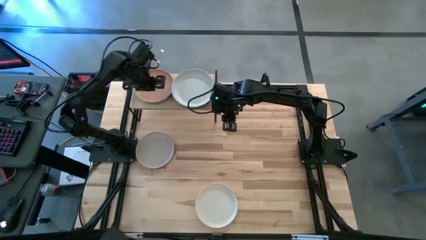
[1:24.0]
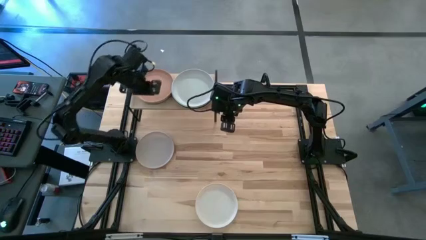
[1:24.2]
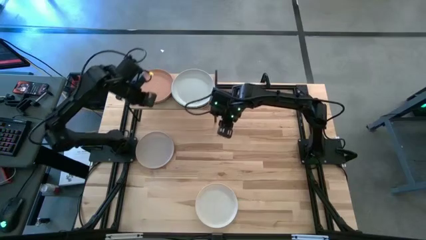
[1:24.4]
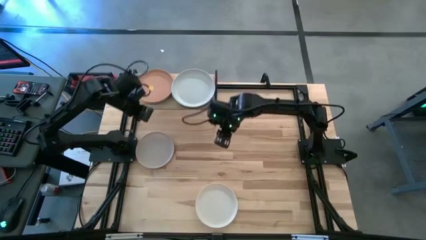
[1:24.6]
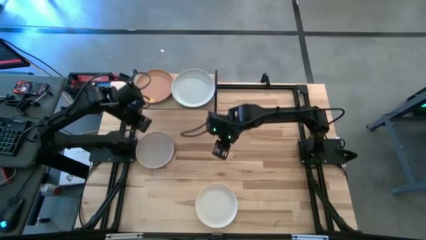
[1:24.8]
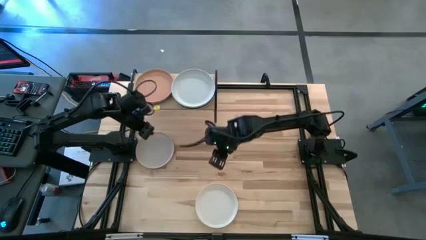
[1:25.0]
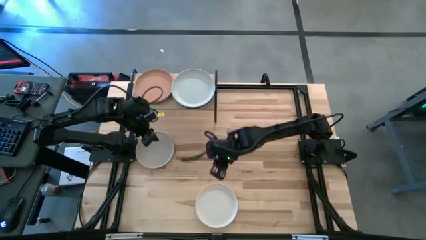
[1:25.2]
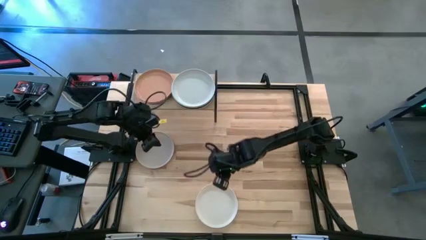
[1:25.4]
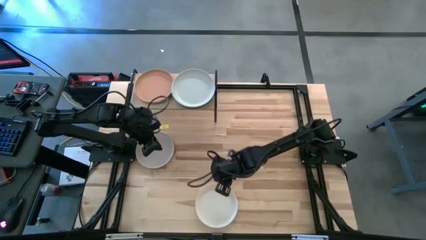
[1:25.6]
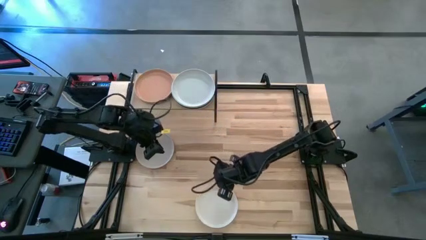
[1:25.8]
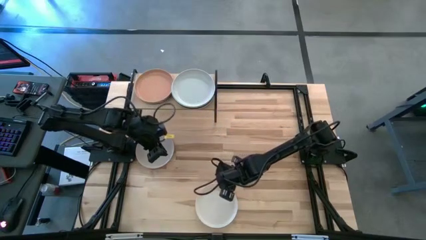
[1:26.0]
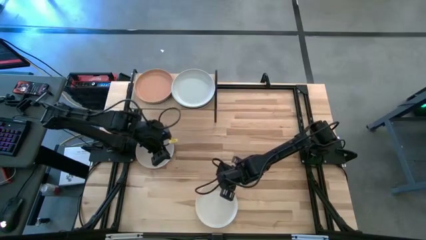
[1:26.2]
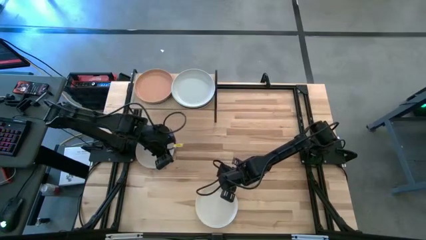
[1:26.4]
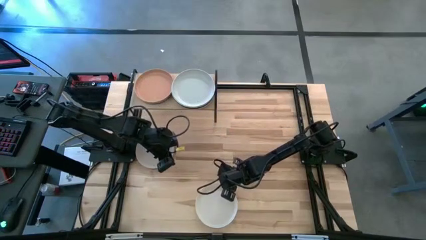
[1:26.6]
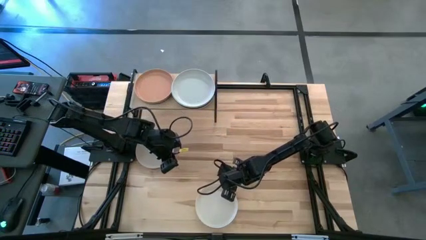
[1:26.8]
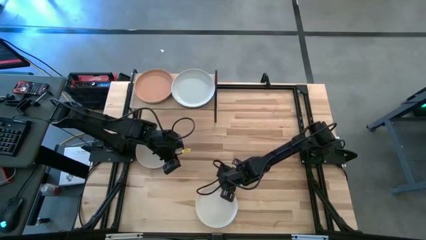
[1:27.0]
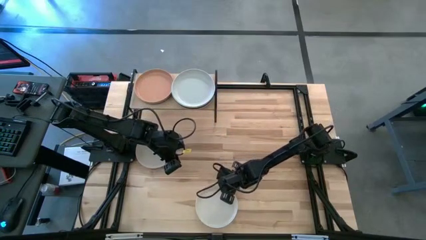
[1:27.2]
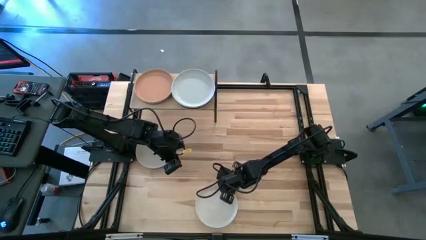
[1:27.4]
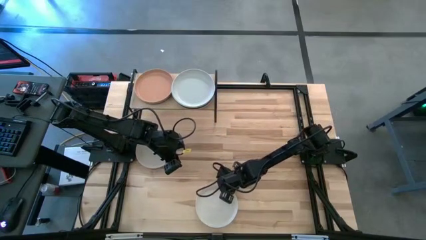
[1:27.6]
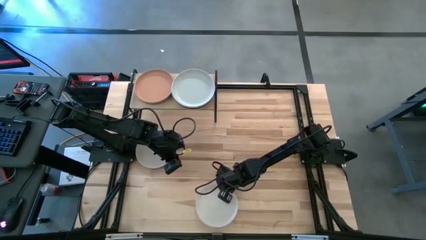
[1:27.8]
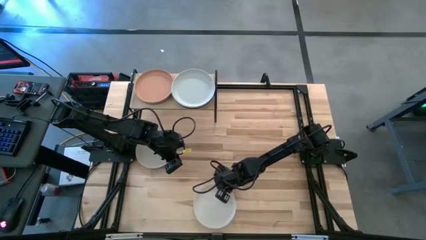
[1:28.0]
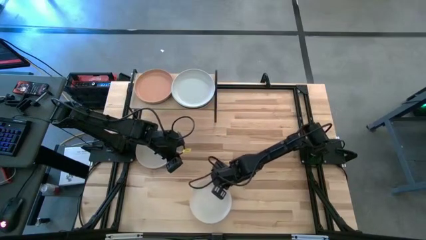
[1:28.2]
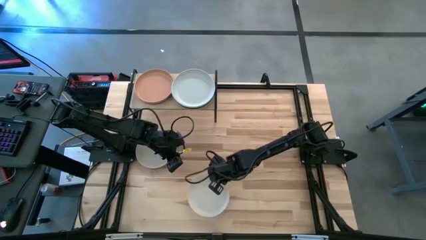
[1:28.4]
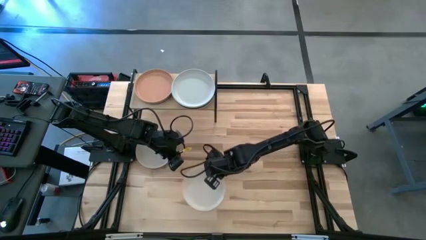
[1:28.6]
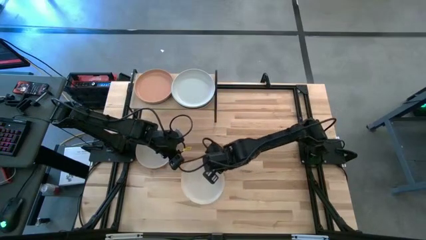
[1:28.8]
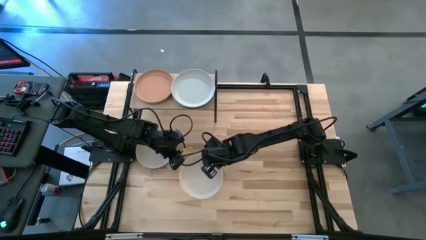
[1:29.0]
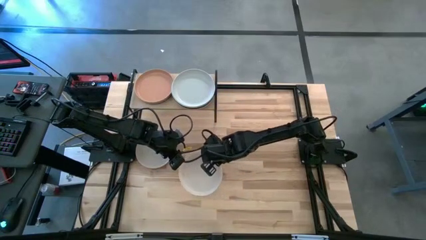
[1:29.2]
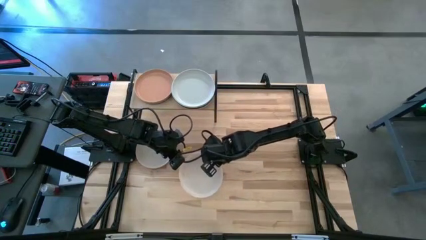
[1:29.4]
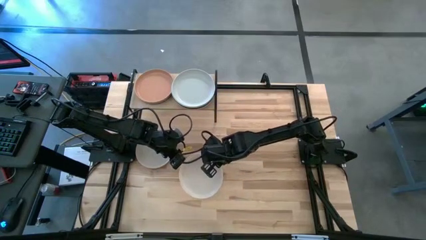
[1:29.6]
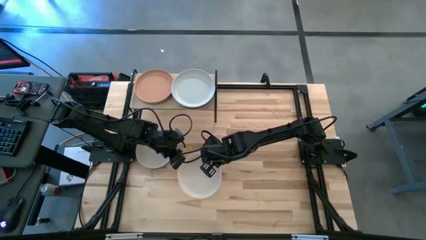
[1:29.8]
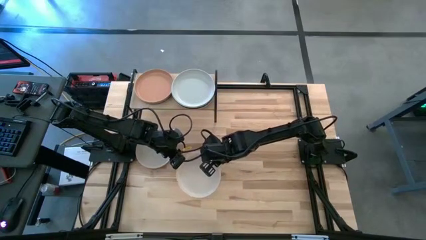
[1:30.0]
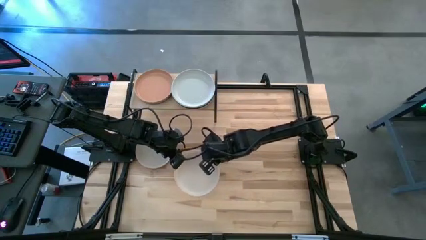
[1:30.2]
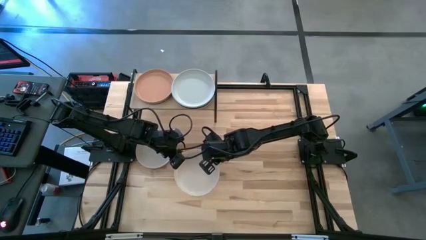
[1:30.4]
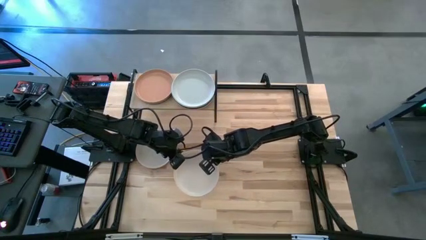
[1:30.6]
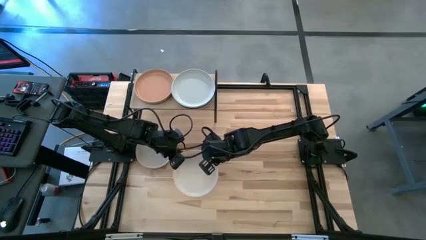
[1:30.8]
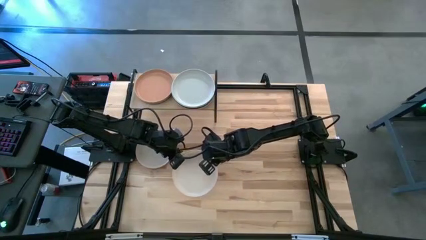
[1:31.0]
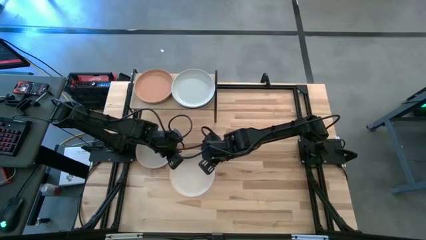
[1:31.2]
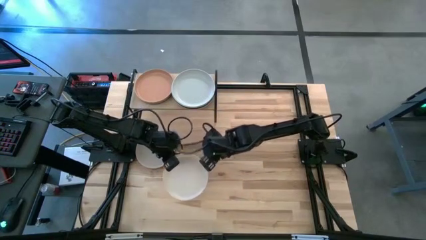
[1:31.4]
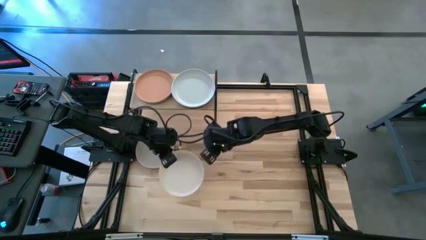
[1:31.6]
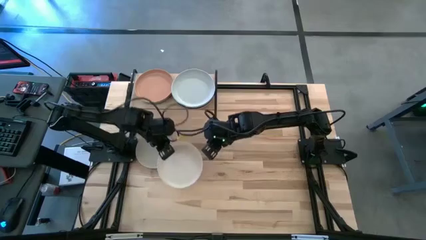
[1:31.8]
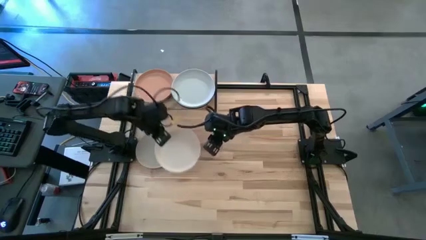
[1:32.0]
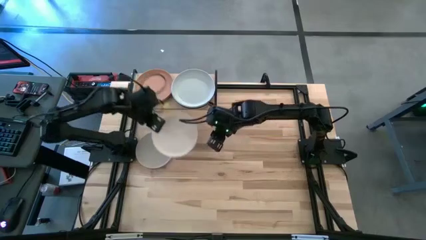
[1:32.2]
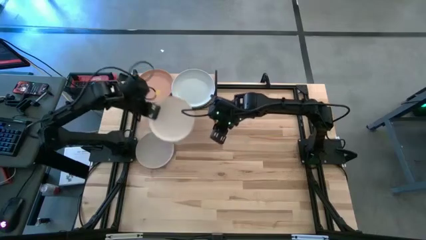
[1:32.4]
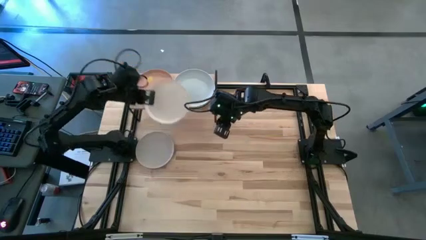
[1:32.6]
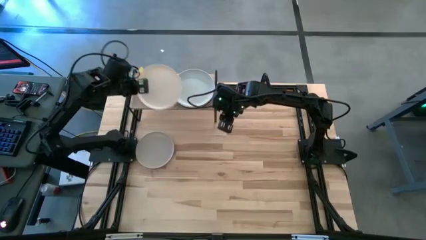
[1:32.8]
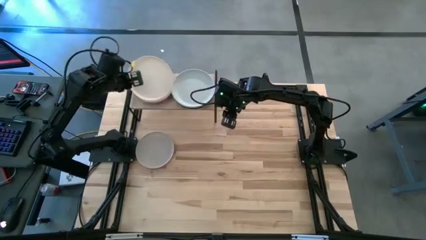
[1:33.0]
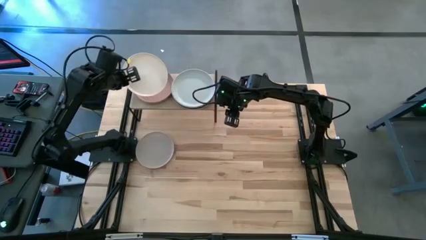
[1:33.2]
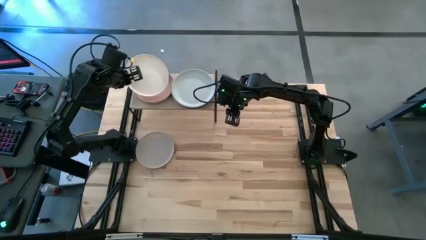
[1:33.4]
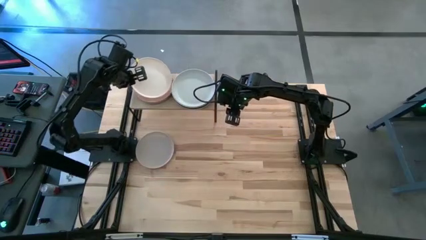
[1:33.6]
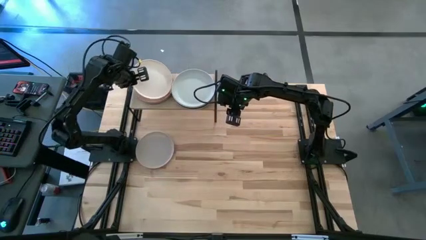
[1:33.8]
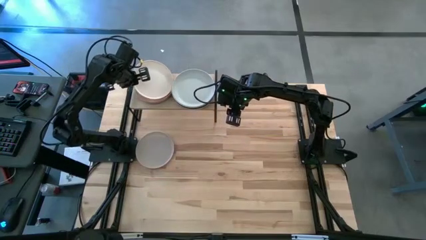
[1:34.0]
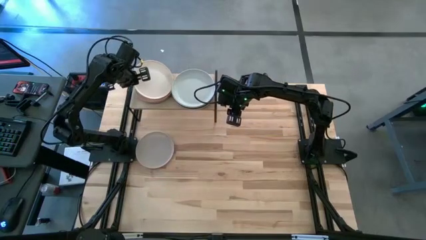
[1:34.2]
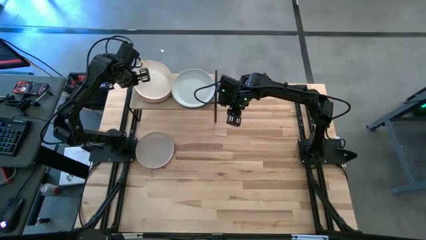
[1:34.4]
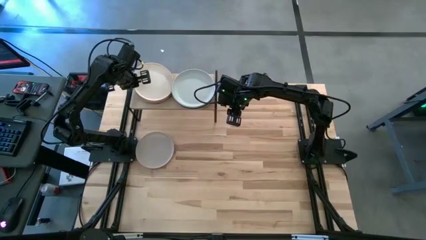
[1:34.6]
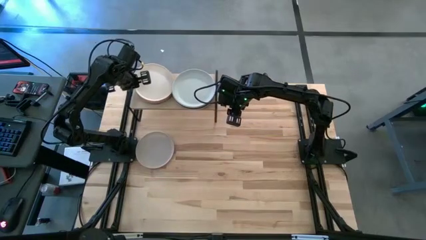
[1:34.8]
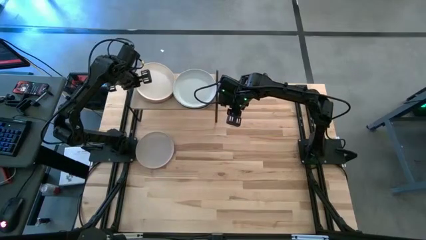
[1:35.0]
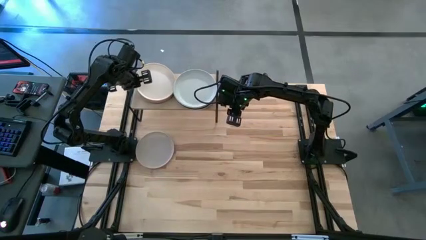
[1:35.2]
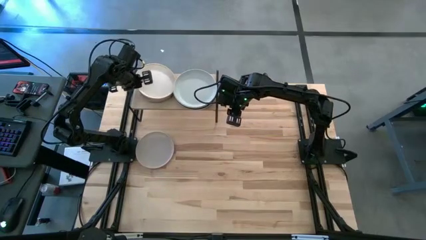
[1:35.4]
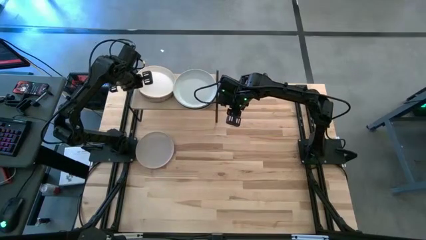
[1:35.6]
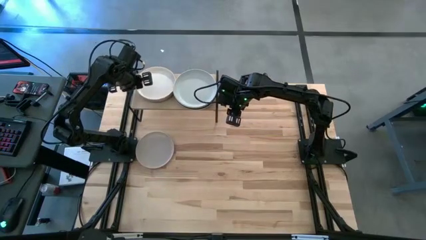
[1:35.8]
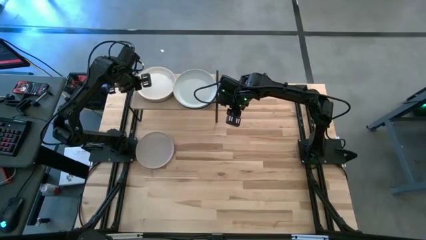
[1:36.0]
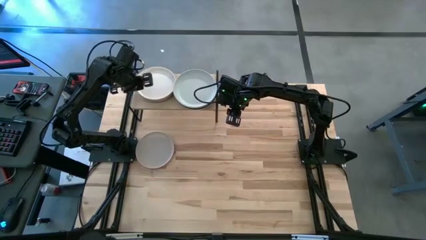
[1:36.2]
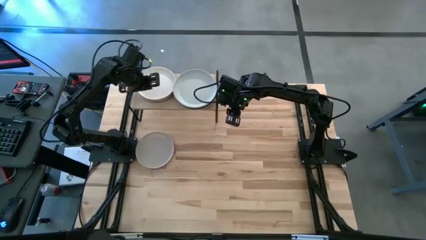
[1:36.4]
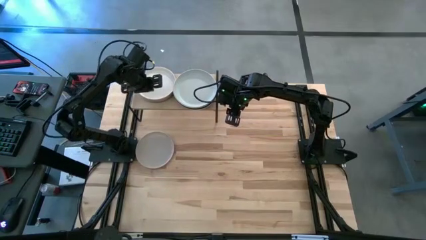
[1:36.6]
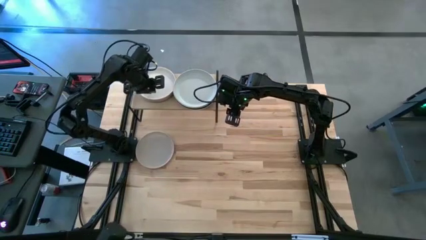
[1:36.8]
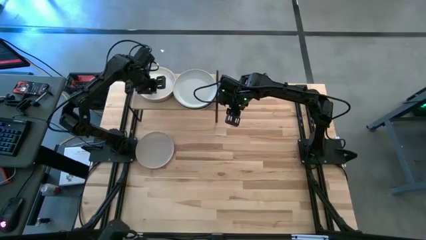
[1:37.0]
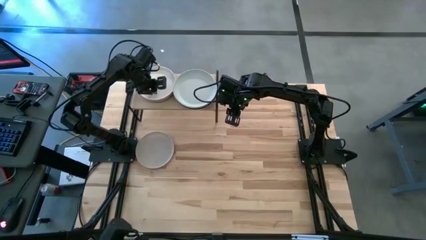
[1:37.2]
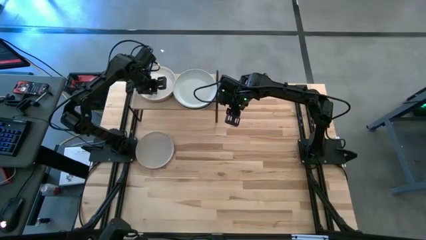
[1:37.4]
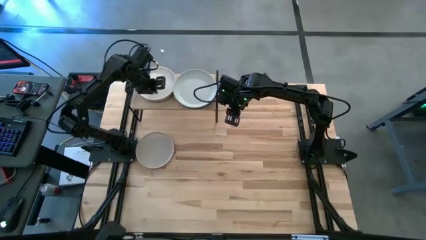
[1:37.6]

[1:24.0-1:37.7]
Task: Place and stack plates onto a shelf
Stack the white plate into the orange plate on the shelf
